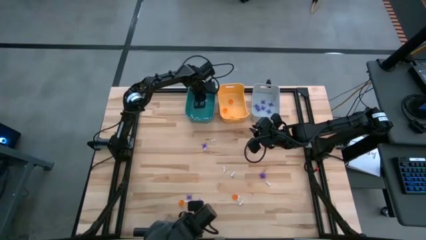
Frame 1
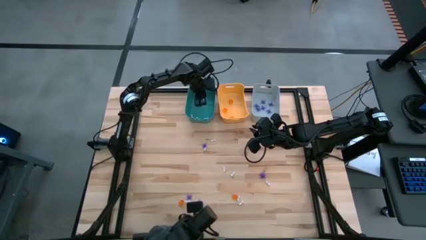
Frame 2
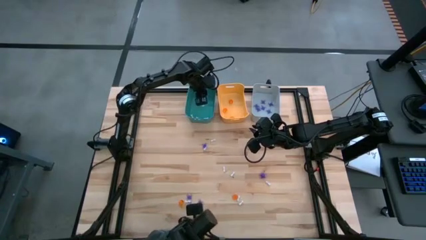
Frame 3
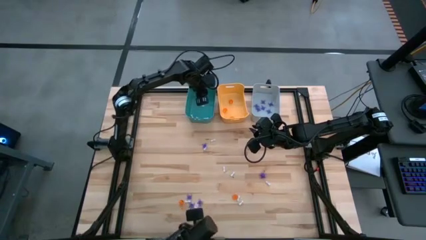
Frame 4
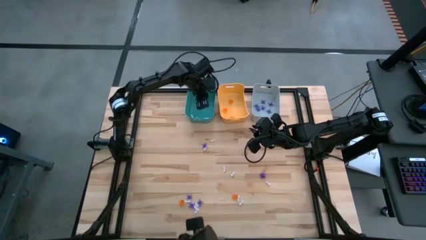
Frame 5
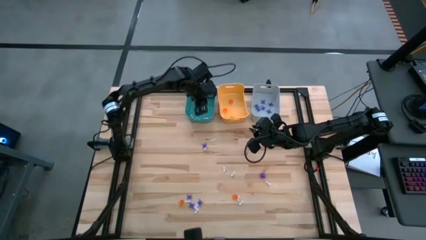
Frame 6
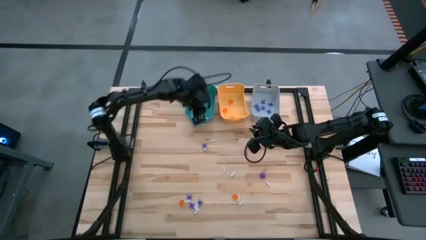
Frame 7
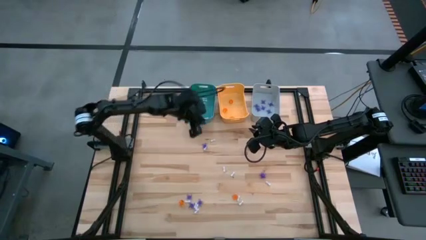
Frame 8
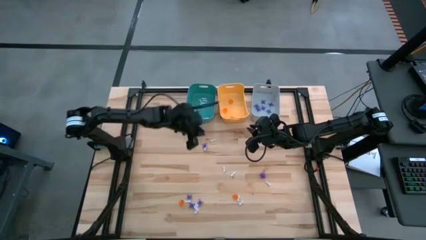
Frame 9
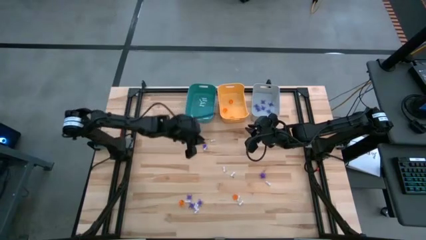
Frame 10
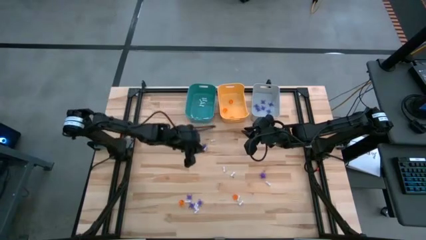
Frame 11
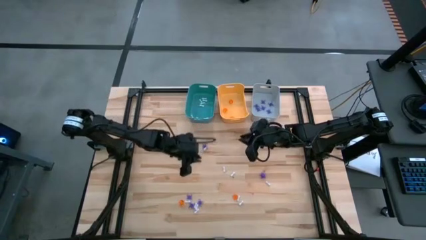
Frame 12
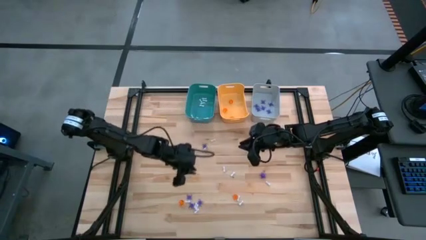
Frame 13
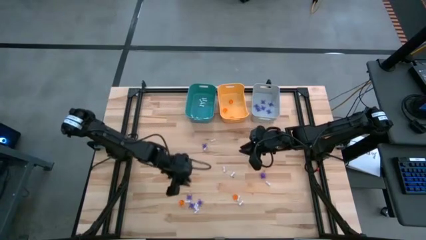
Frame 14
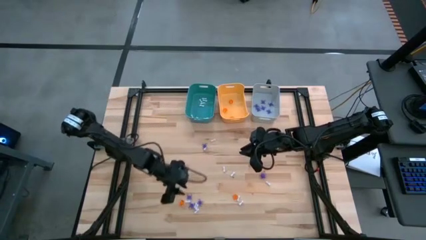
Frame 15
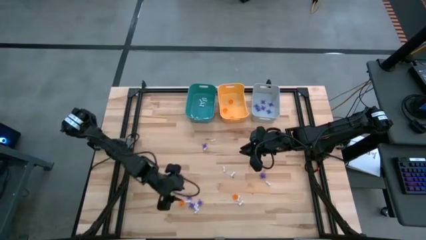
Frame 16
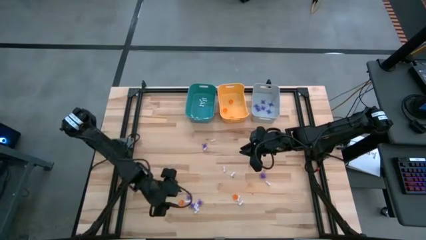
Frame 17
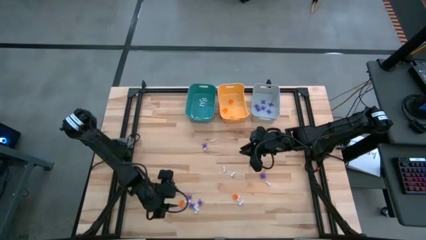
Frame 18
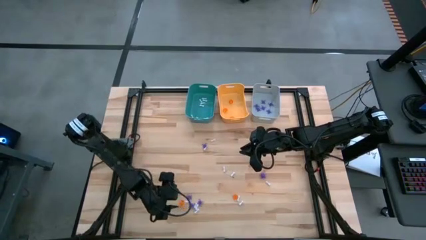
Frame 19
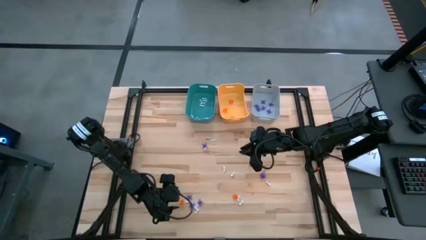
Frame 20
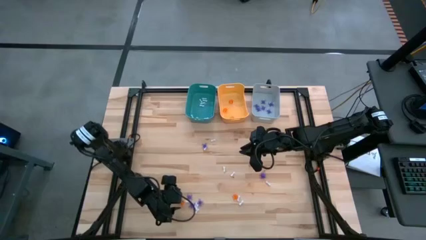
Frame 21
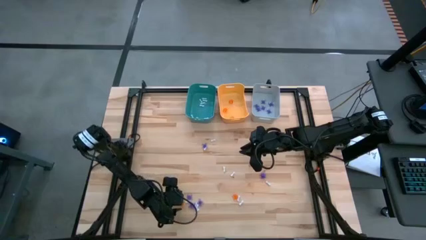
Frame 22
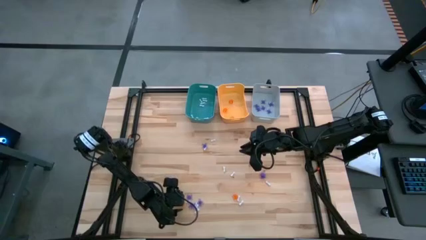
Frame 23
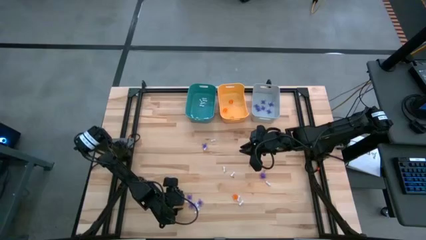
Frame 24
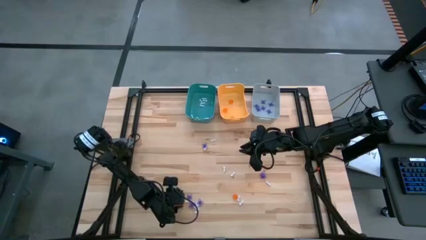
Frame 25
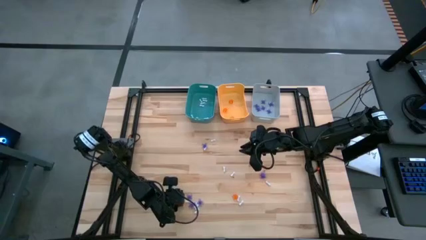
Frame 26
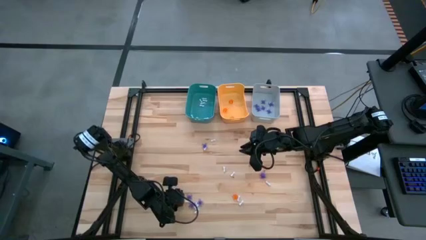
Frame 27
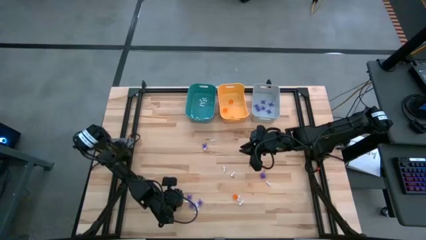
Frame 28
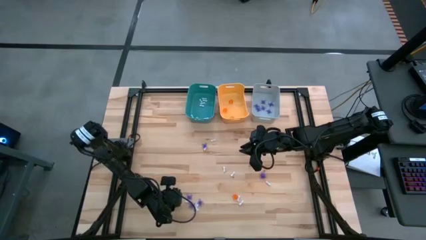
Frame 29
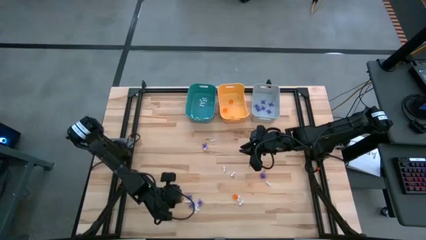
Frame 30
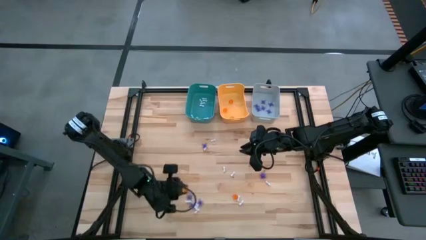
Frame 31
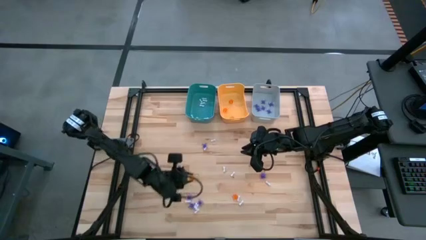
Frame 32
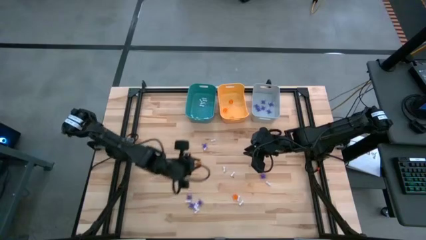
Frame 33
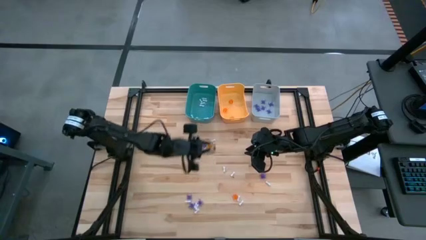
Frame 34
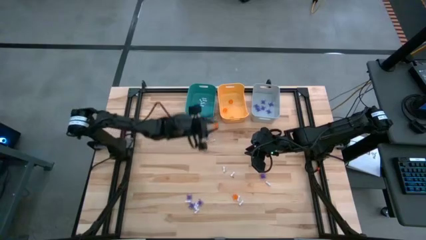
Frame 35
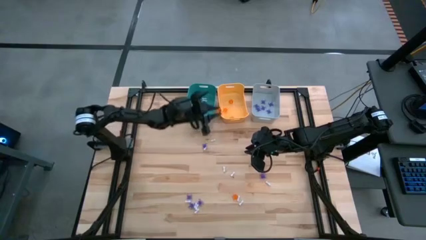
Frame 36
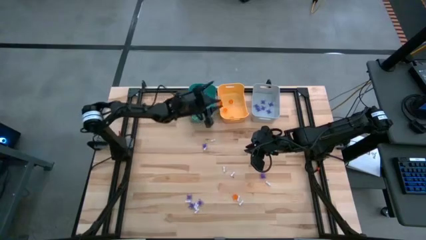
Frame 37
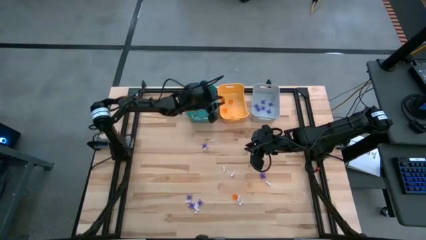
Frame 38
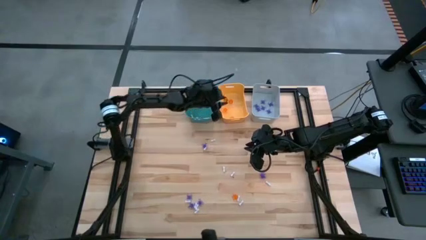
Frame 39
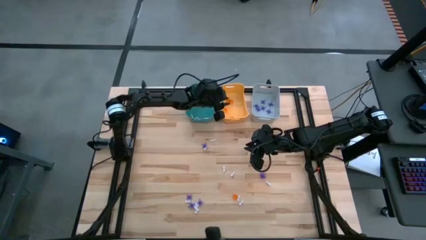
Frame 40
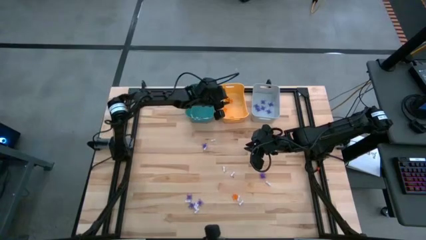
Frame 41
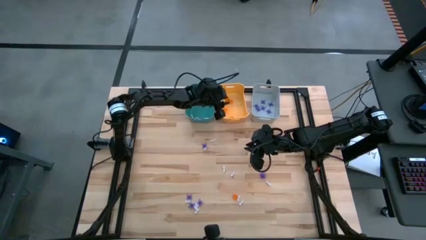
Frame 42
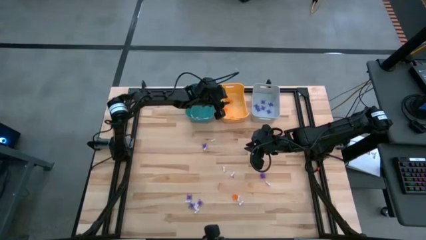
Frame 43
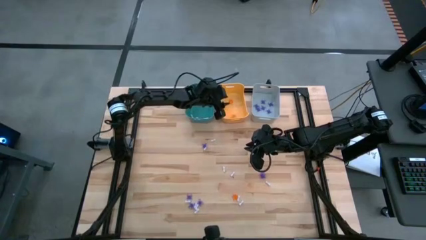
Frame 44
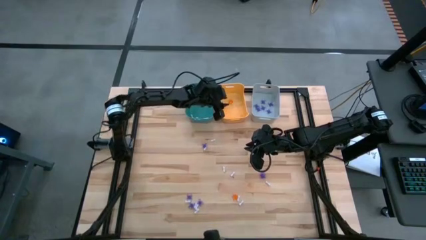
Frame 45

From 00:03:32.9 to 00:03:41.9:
Task: Sort Halloween decoration
Put the orange pumpkin toy into the yellow bin

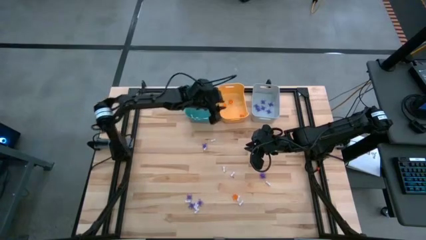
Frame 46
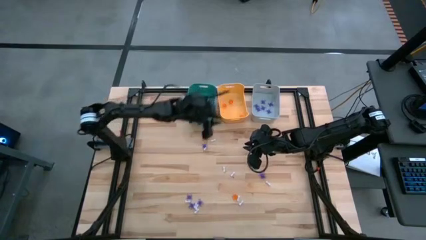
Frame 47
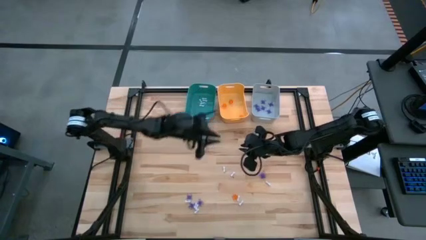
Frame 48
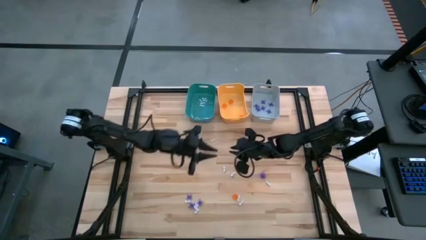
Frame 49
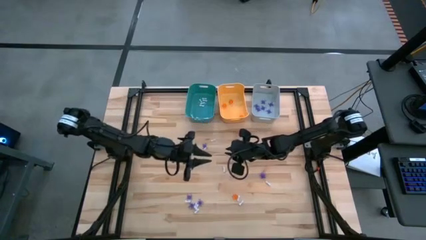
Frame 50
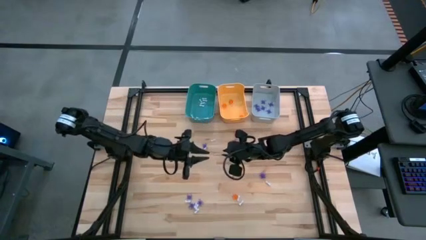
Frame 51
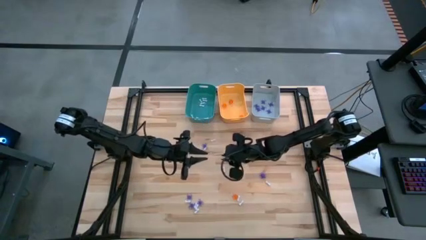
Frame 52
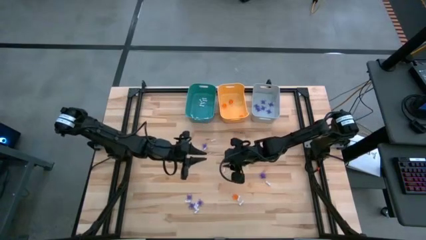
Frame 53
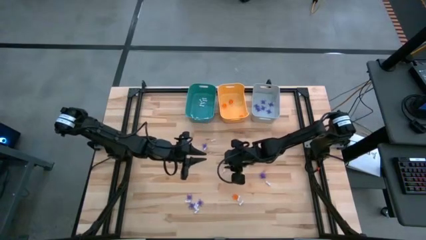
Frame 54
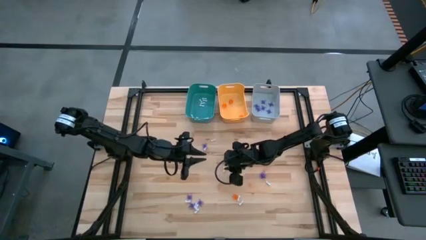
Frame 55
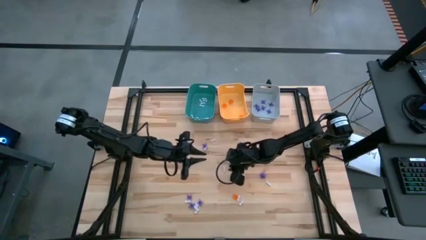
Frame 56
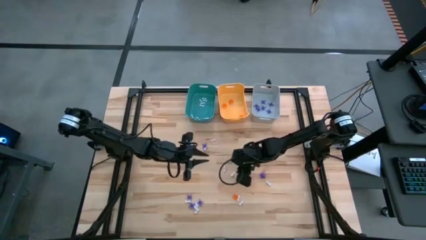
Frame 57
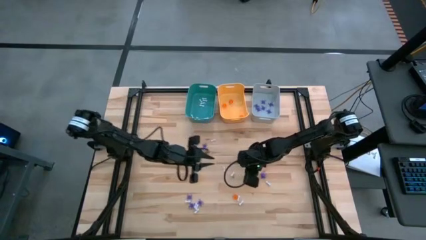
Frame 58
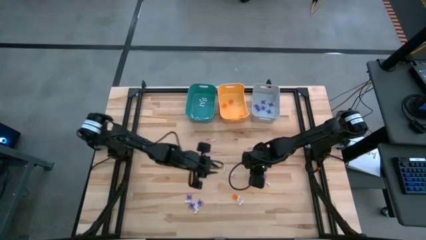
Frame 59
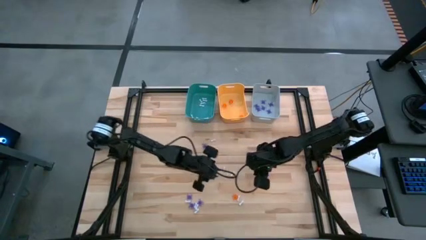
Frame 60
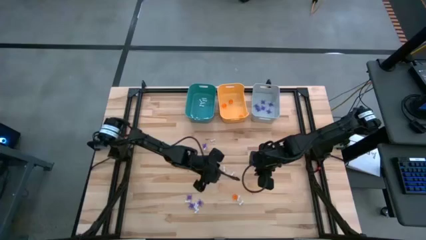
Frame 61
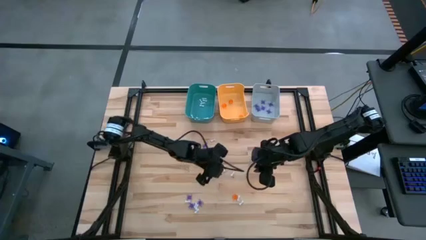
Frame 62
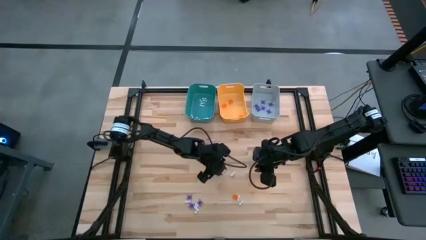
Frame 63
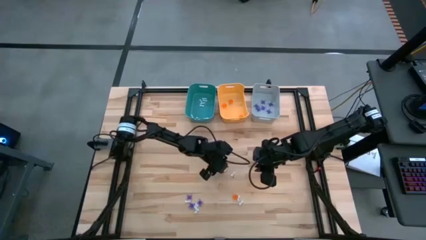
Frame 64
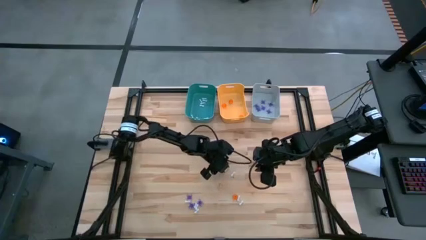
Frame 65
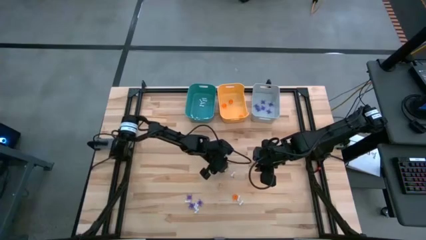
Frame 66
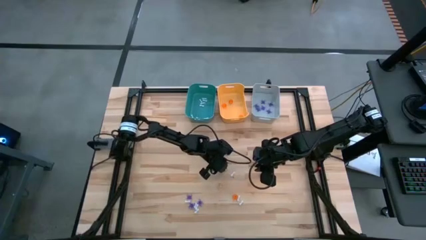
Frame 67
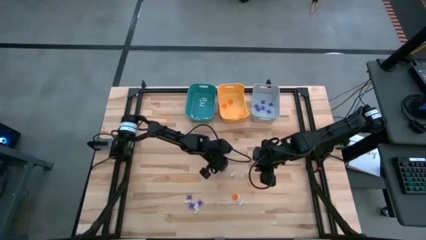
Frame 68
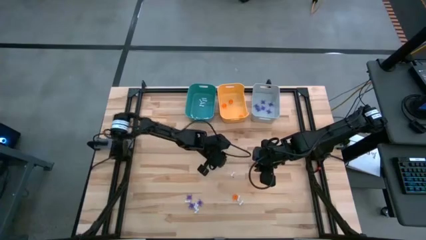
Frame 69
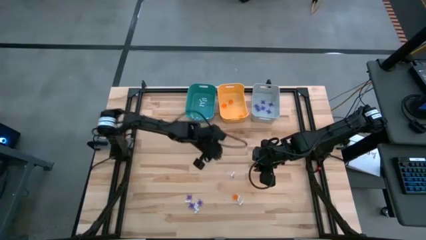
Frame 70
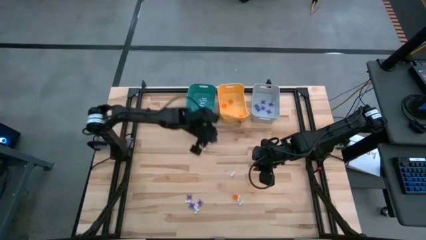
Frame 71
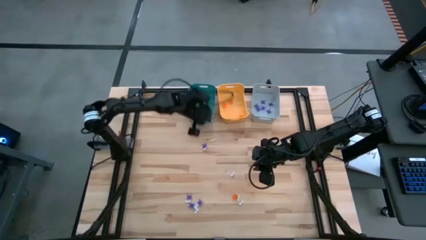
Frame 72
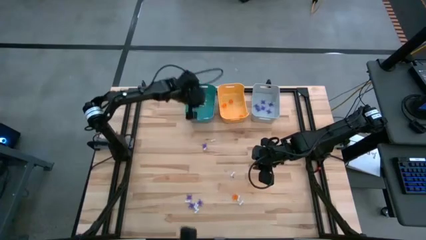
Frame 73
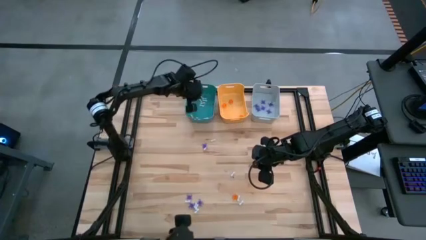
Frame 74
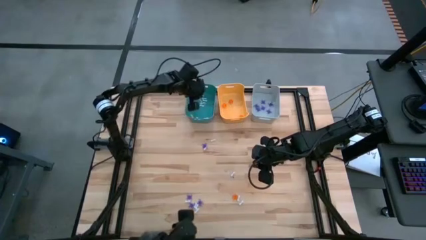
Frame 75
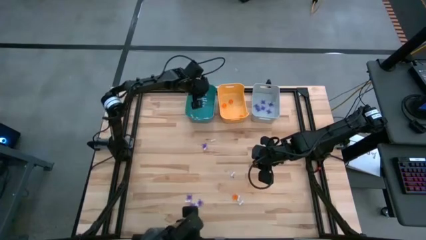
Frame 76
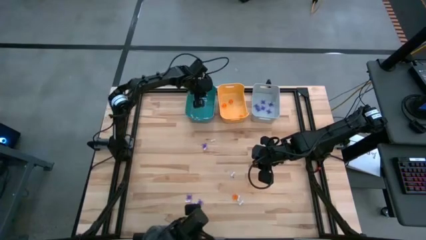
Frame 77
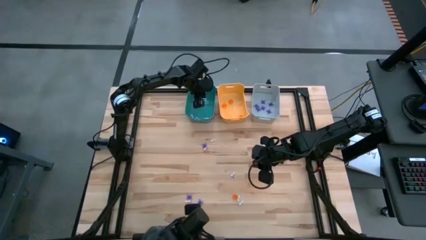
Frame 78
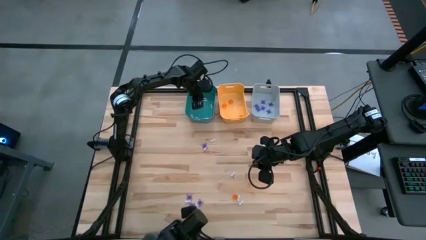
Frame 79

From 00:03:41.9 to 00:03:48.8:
Put the white bone toy into the blue bin
